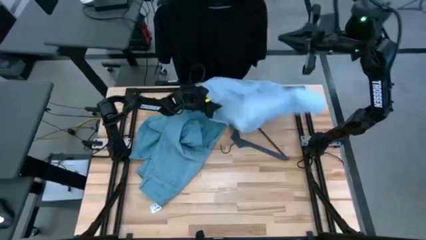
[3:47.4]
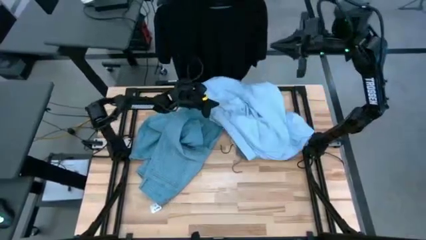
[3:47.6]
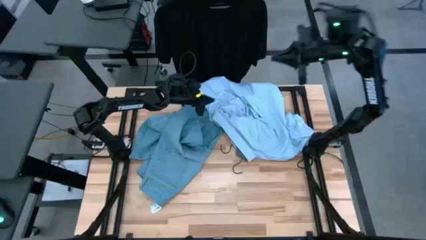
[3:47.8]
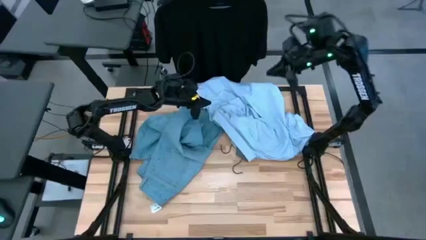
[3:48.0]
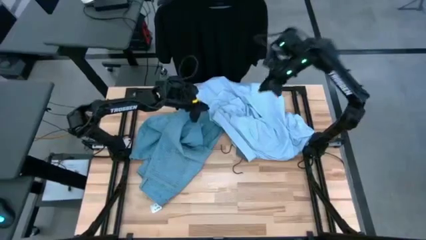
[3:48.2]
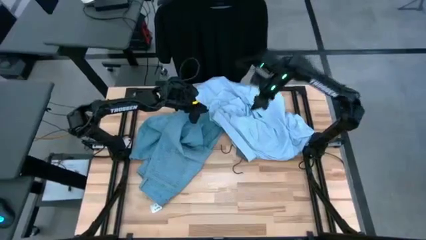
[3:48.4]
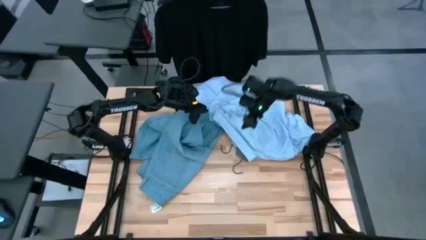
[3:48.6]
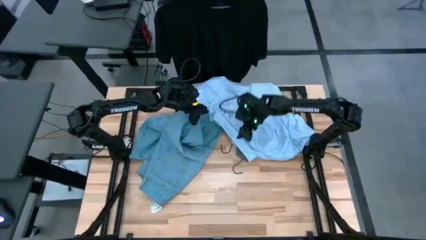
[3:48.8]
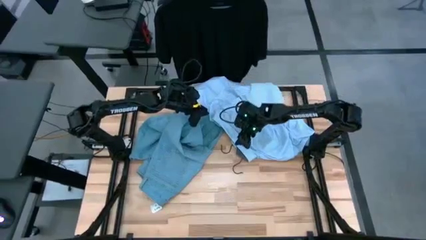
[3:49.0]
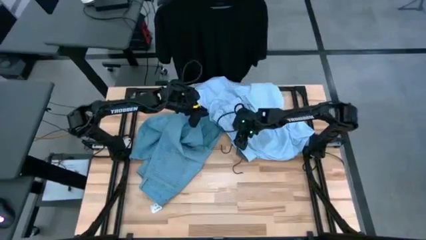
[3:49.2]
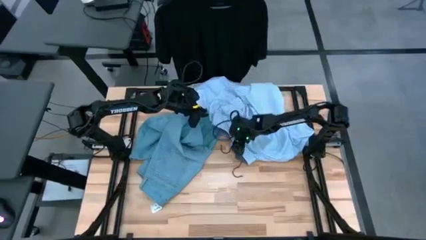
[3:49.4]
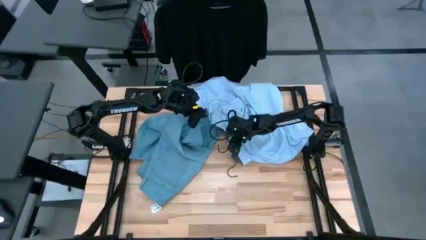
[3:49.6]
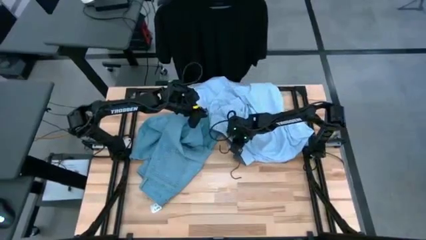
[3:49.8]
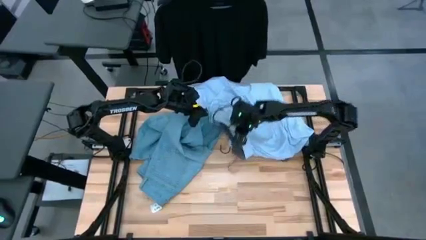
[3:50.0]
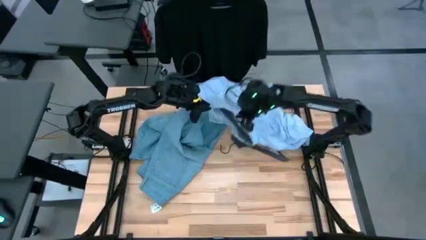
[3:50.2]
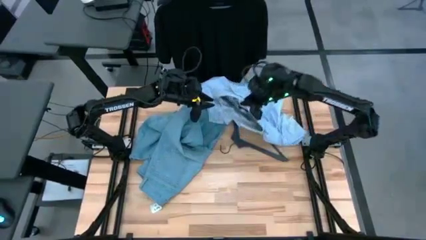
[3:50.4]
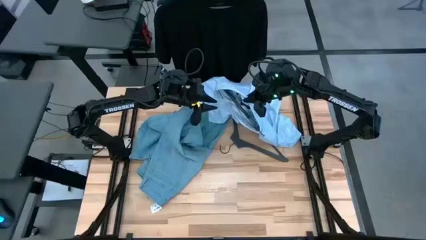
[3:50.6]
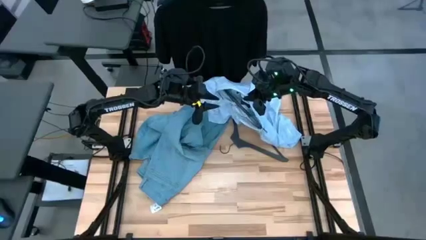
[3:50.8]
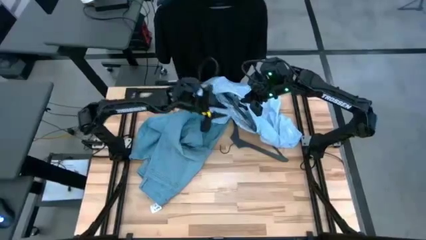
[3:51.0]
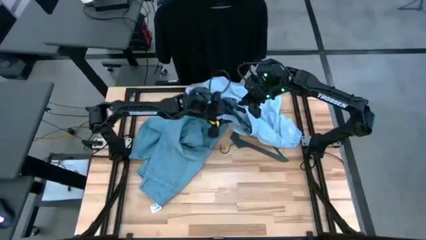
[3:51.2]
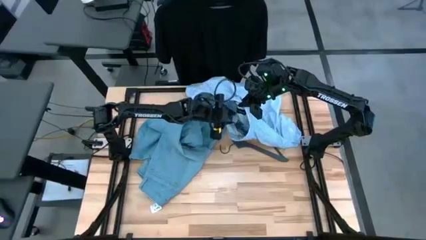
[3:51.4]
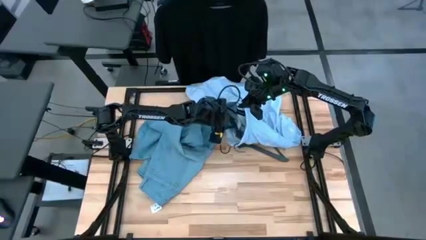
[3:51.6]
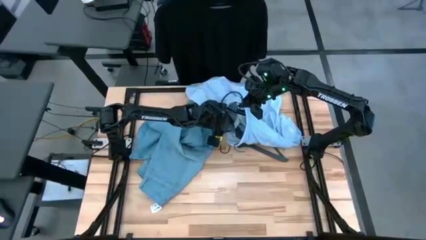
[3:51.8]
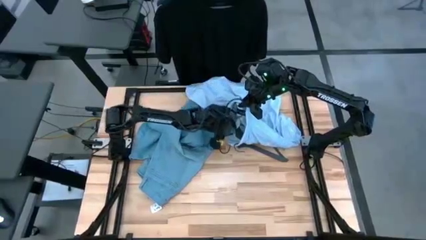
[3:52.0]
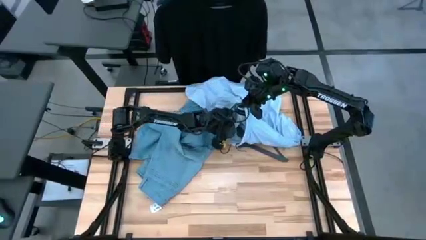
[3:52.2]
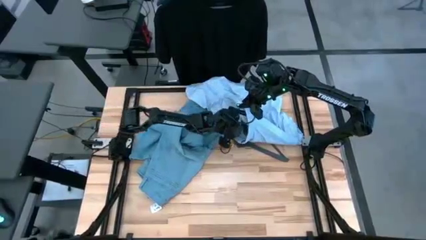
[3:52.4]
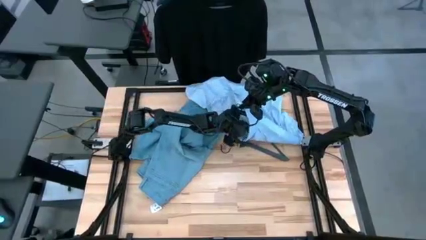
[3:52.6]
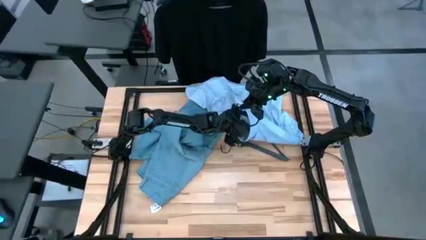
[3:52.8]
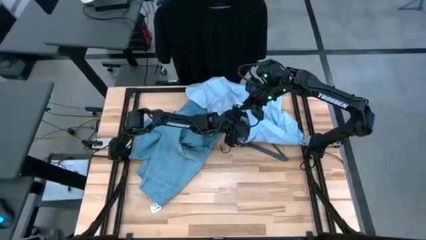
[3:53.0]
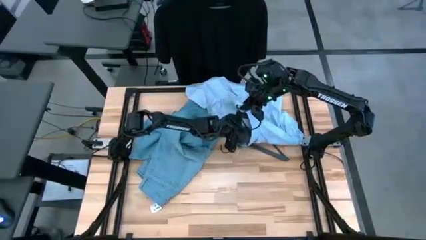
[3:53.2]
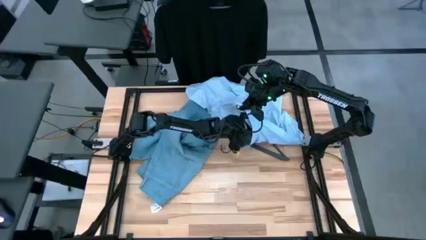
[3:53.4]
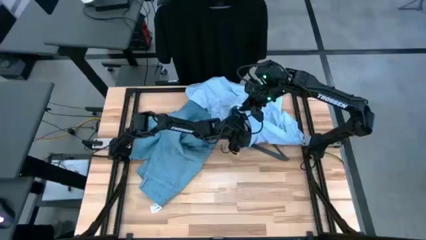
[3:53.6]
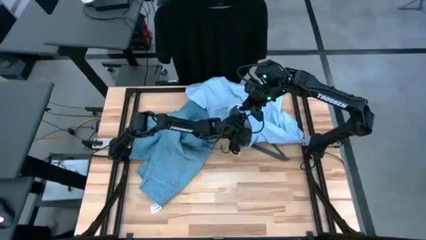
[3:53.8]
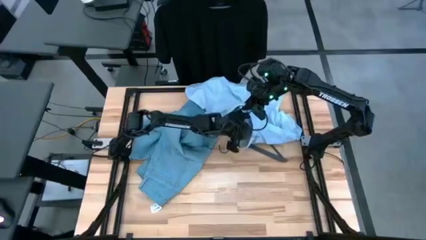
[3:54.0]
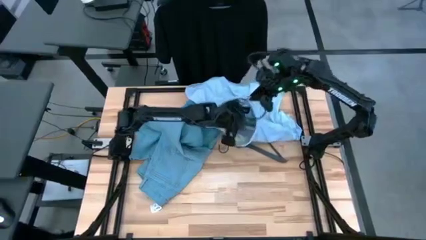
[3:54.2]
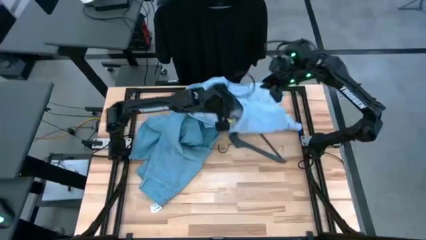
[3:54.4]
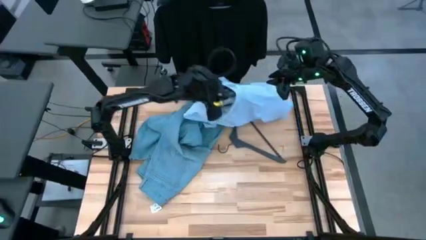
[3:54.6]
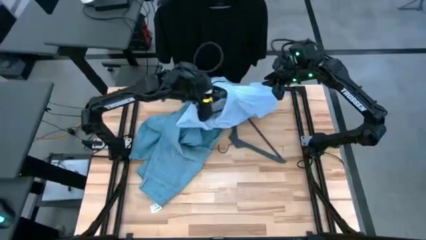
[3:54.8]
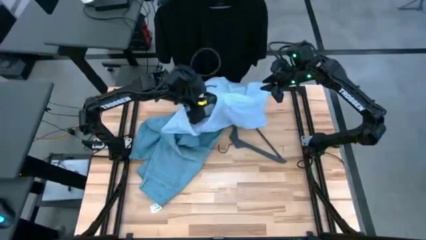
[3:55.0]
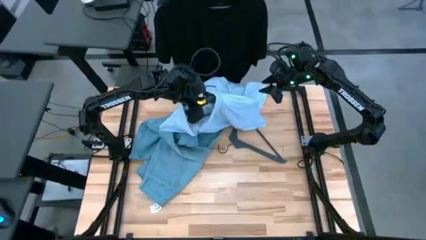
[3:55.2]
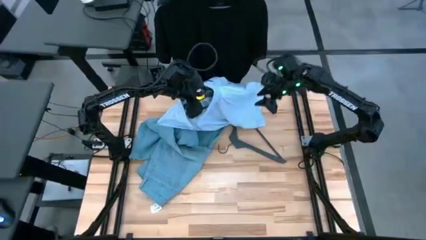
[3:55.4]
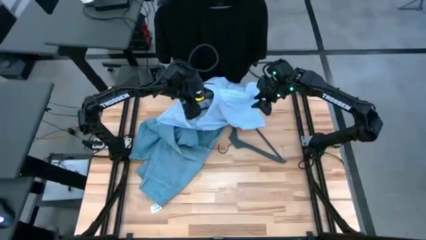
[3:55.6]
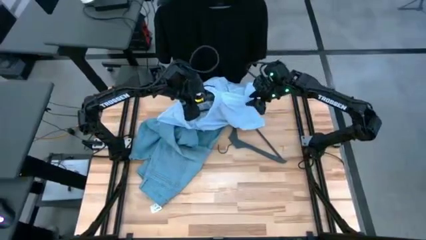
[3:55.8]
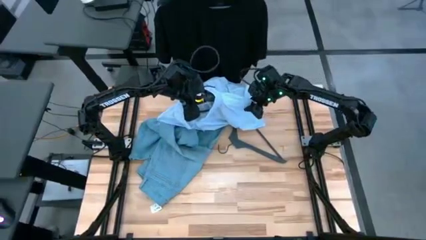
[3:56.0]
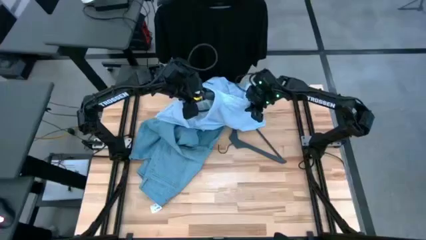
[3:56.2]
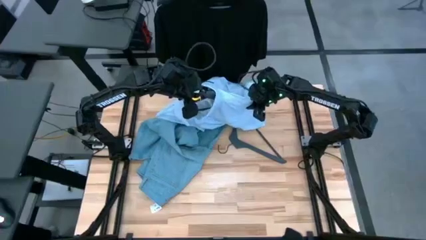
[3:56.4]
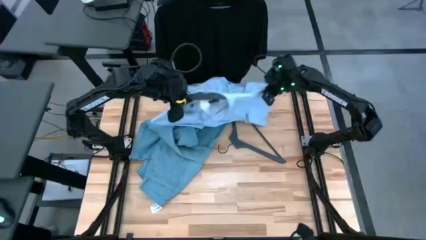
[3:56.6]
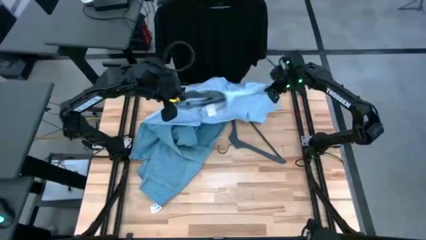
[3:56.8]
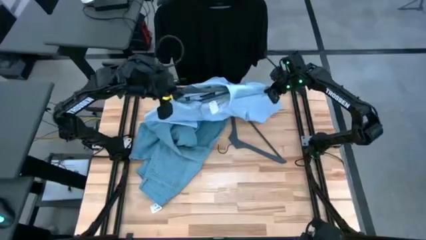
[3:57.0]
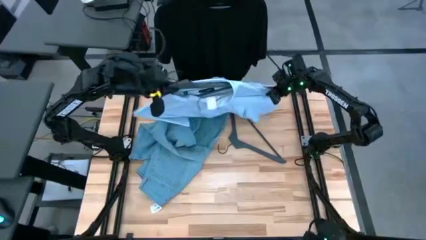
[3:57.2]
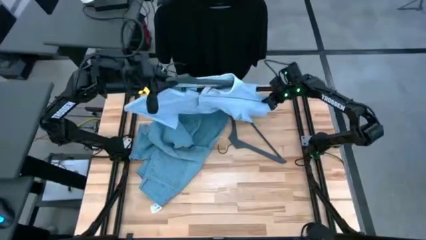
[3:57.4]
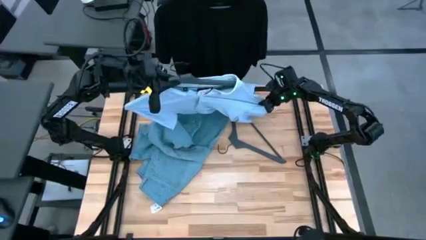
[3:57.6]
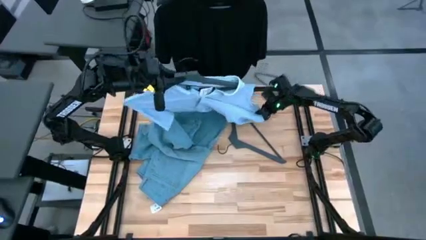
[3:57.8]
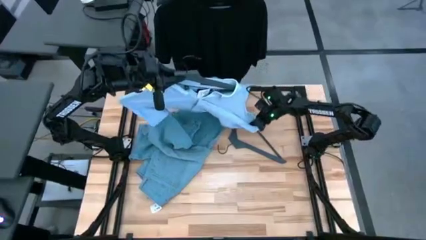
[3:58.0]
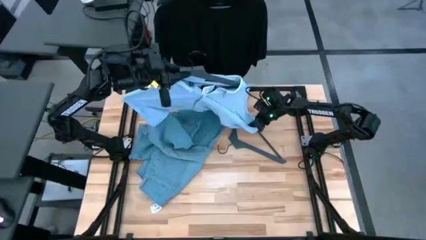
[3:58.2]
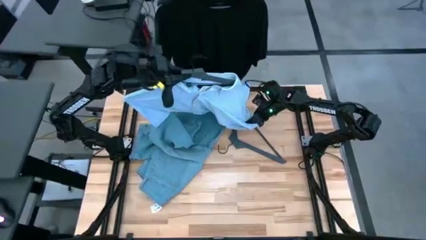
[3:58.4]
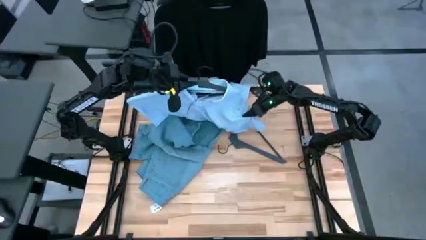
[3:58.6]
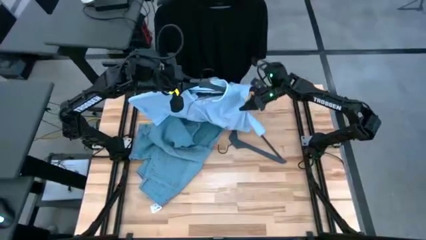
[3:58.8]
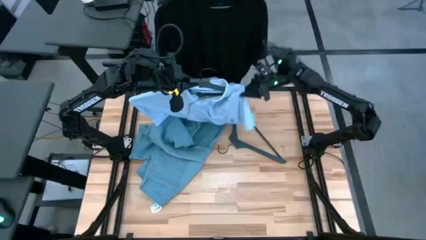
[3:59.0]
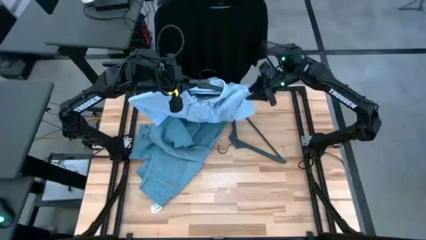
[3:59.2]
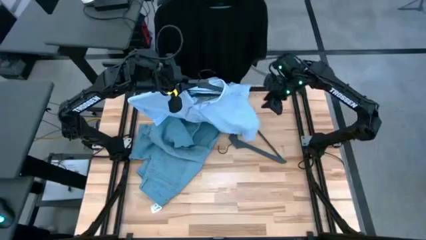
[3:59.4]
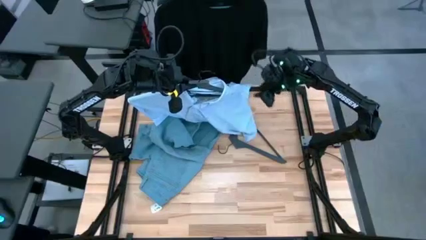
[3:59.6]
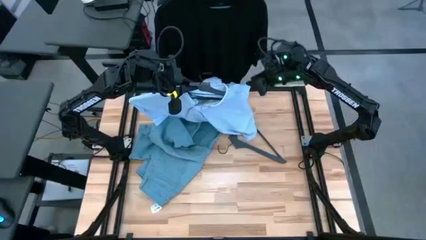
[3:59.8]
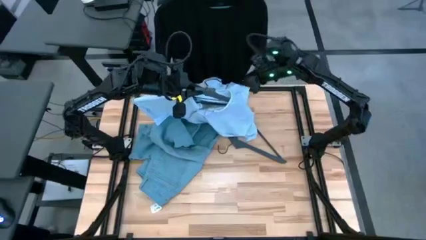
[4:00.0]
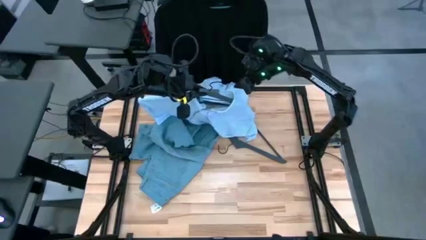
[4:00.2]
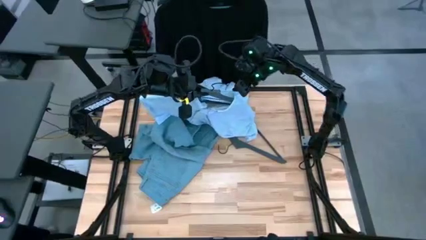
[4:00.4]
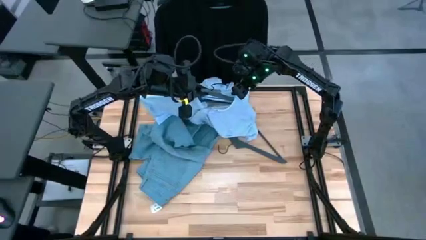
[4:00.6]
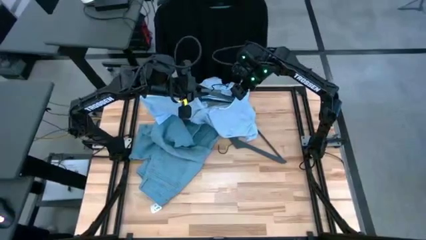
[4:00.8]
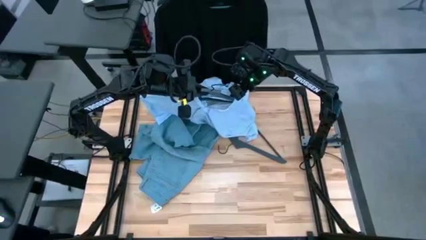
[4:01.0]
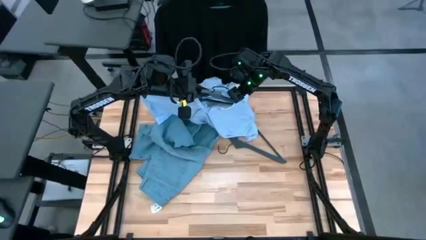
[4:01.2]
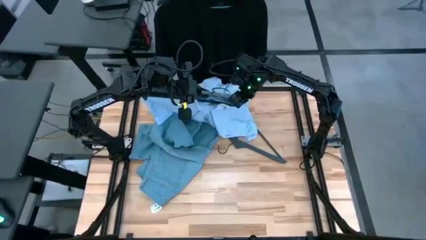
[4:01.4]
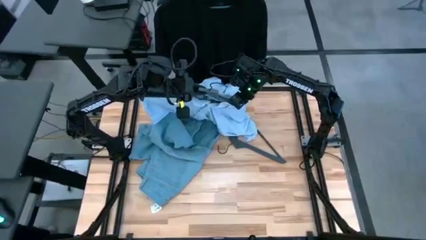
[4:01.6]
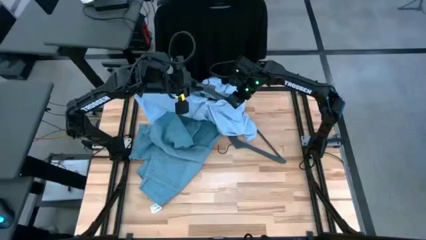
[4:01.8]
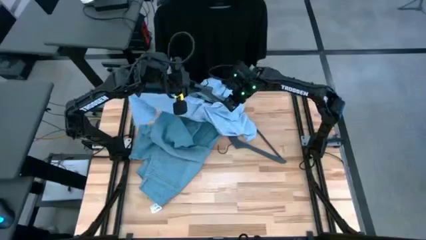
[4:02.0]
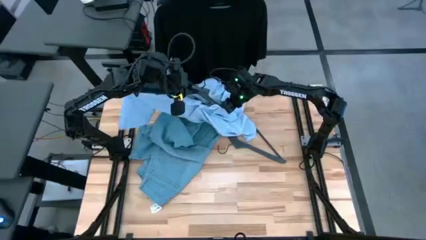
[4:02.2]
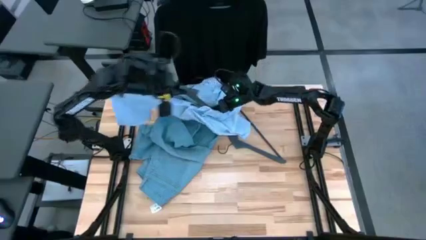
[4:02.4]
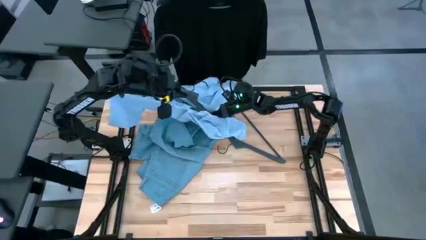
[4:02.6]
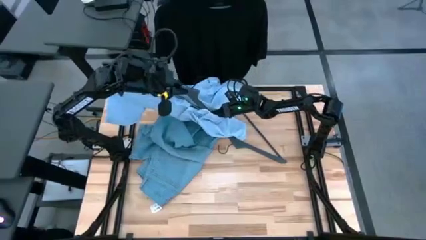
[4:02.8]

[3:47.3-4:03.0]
Task: Hang clothes
Unhang the blue shirt from the rack

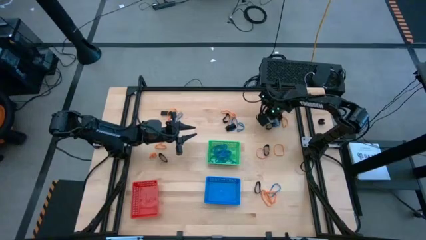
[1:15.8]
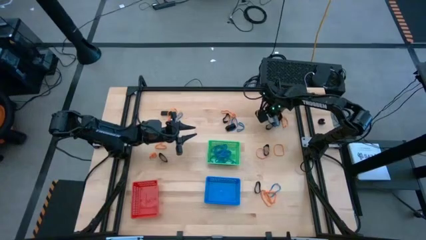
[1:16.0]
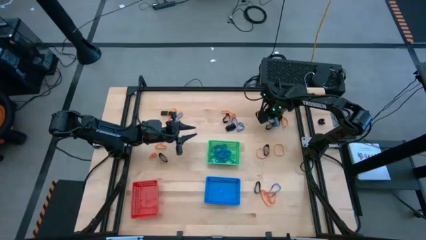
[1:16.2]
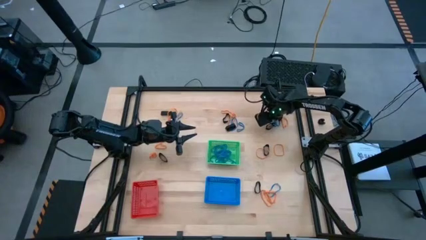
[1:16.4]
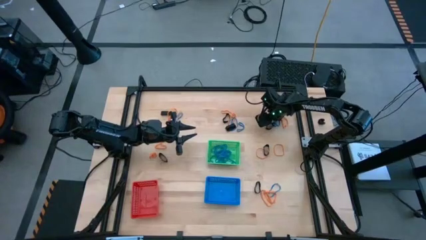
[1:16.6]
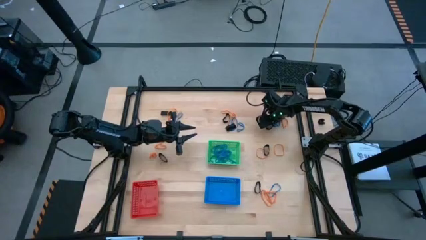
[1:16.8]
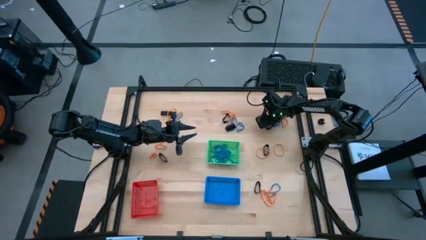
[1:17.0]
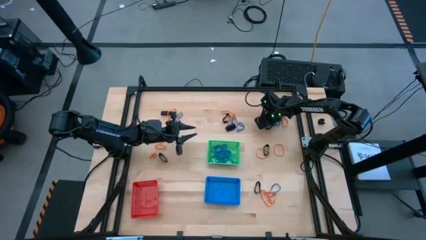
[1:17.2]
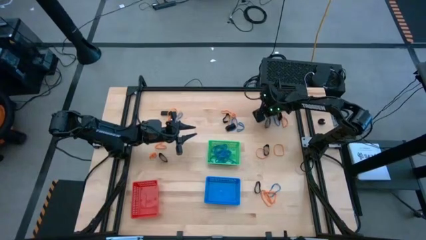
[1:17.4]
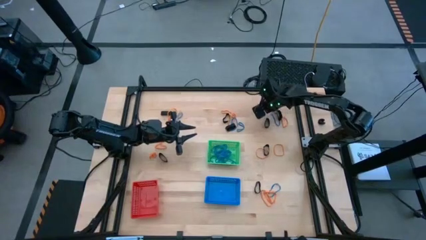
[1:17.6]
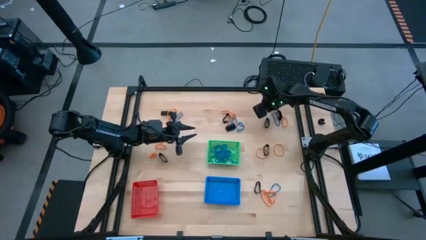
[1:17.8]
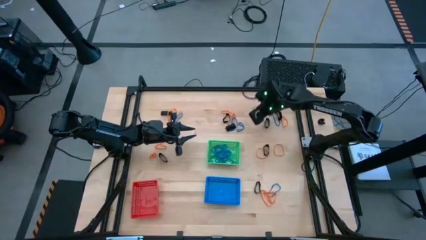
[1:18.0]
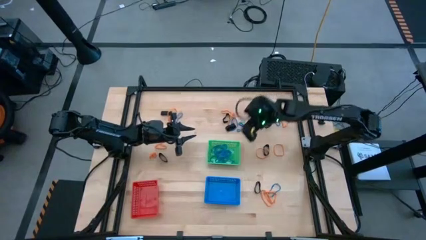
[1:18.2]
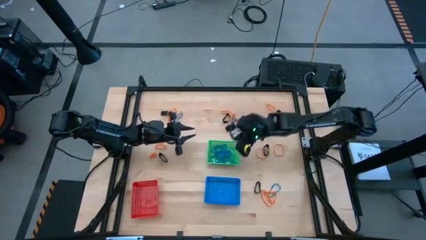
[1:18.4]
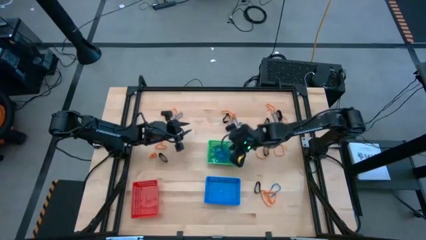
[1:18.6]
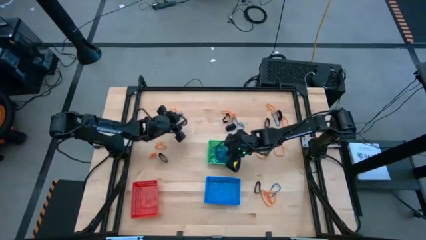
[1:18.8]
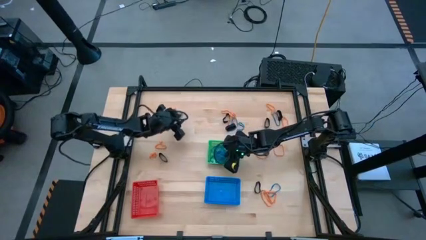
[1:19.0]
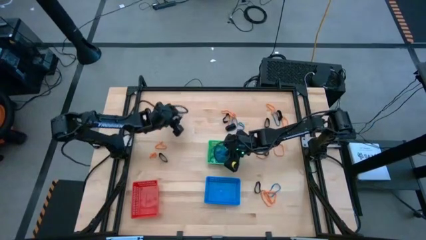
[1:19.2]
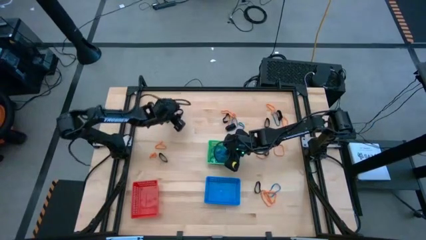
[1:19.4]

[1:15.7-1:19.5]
Task: Sort rubber bands into baskets
Put the blue rubberband into the green bin
